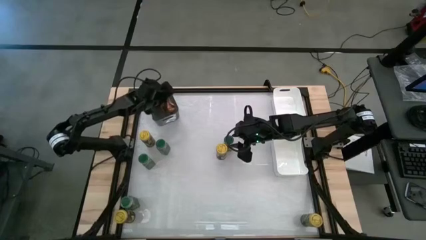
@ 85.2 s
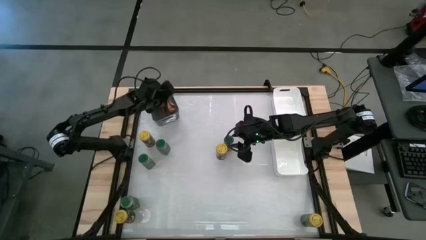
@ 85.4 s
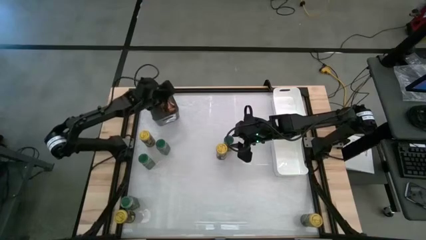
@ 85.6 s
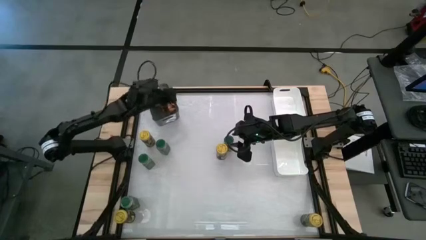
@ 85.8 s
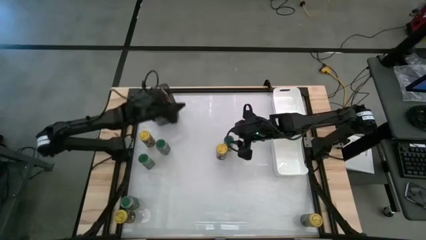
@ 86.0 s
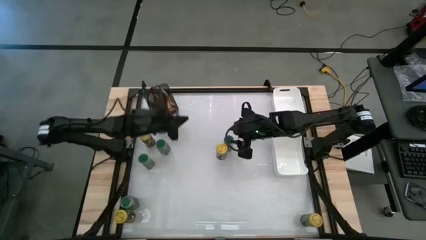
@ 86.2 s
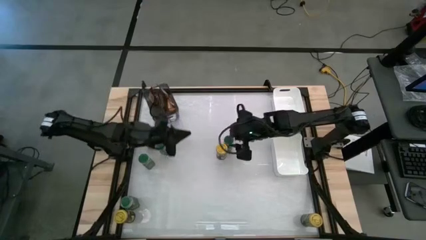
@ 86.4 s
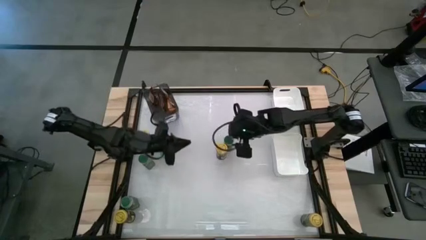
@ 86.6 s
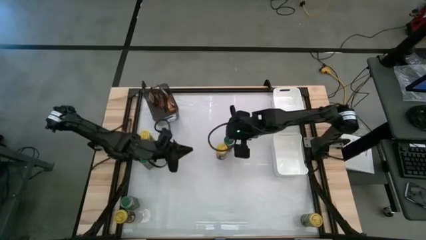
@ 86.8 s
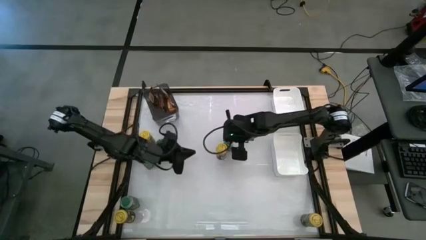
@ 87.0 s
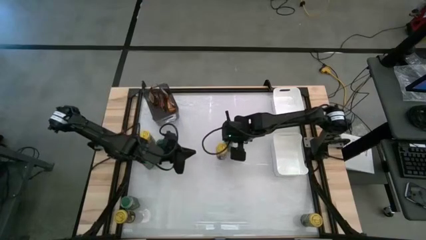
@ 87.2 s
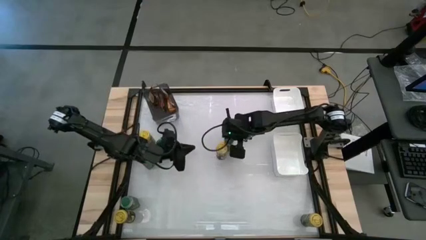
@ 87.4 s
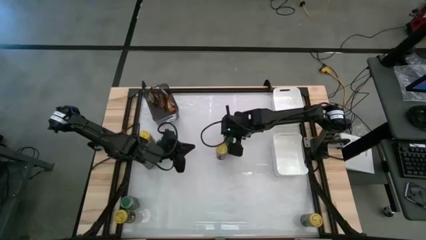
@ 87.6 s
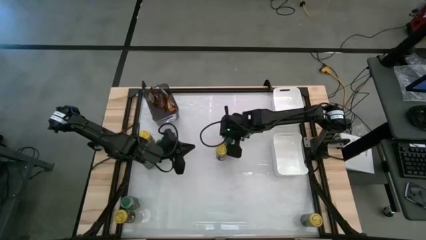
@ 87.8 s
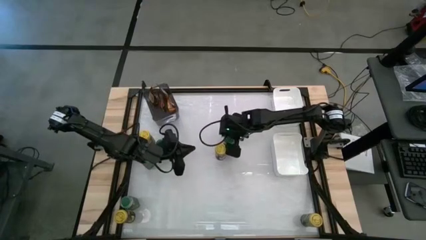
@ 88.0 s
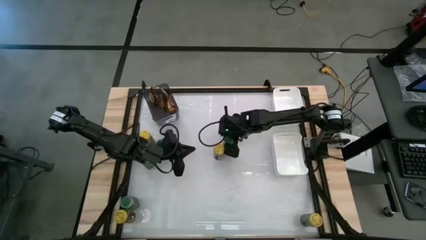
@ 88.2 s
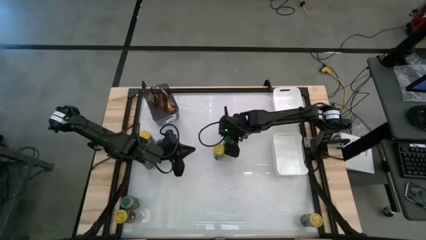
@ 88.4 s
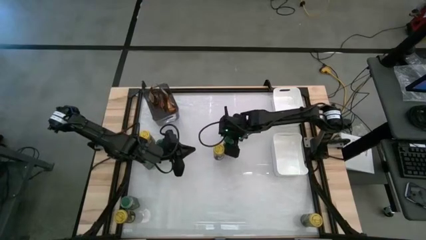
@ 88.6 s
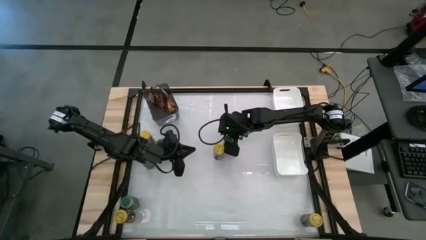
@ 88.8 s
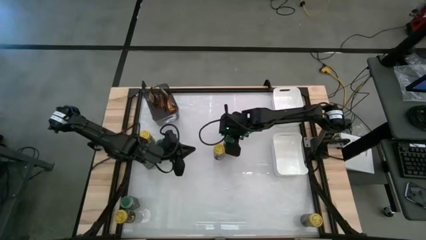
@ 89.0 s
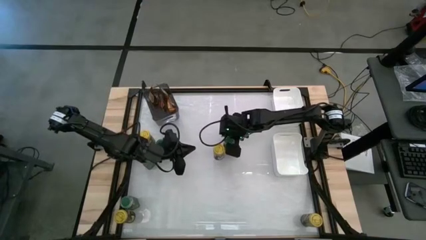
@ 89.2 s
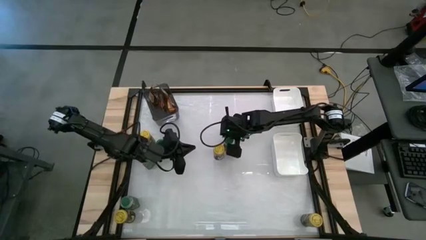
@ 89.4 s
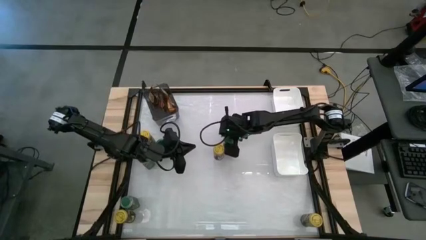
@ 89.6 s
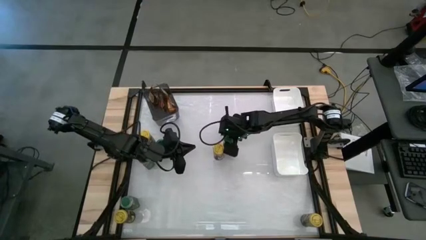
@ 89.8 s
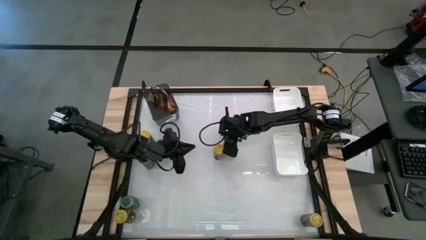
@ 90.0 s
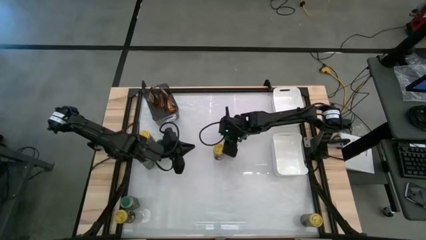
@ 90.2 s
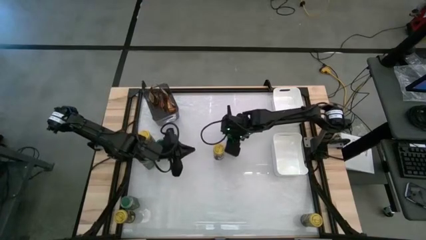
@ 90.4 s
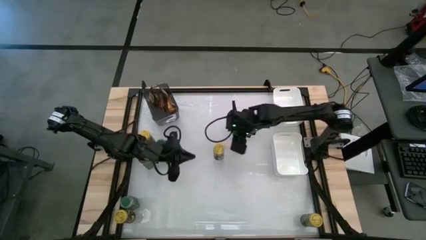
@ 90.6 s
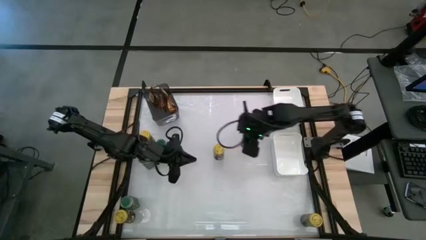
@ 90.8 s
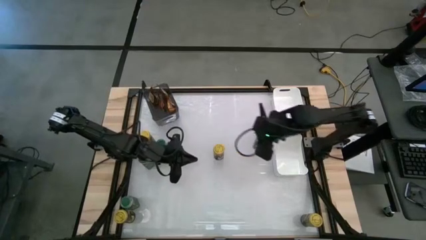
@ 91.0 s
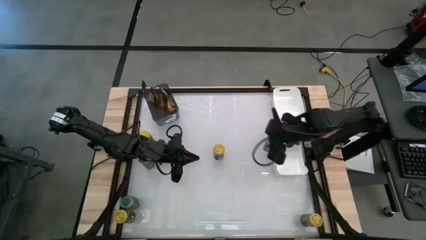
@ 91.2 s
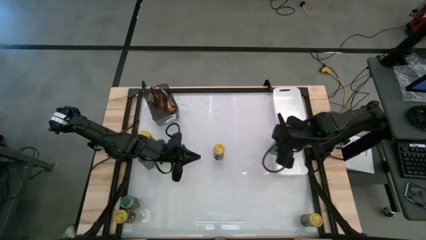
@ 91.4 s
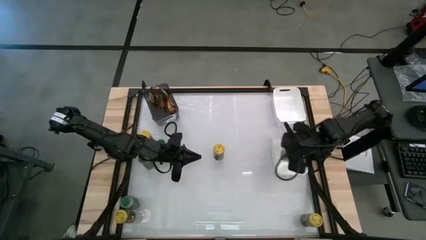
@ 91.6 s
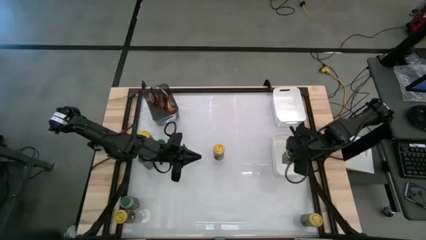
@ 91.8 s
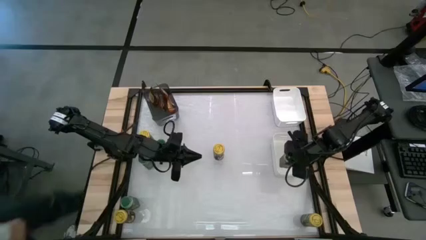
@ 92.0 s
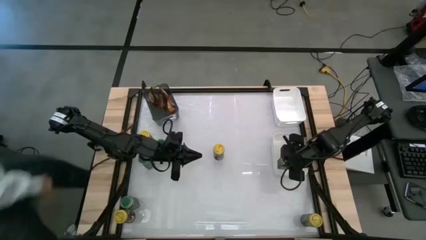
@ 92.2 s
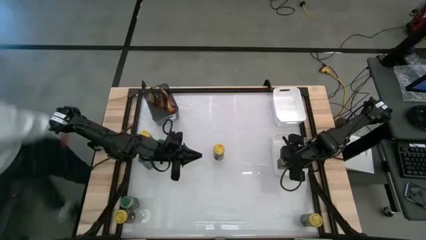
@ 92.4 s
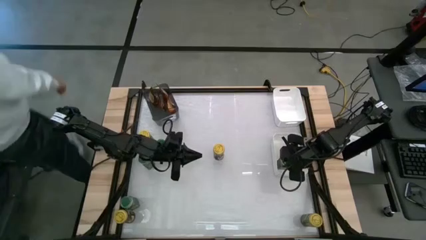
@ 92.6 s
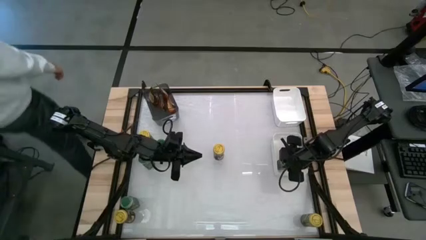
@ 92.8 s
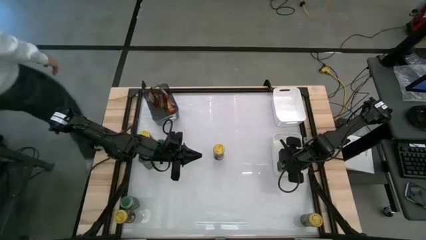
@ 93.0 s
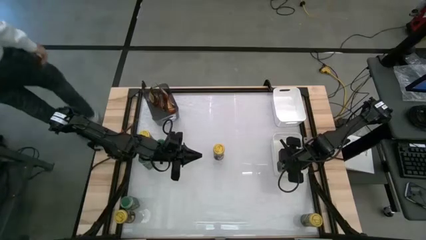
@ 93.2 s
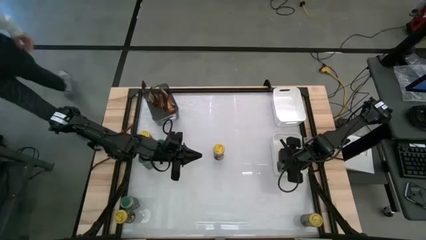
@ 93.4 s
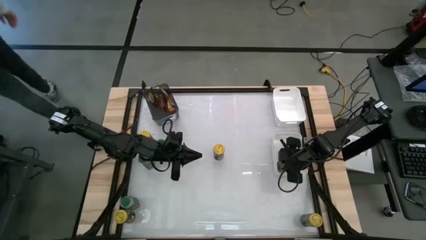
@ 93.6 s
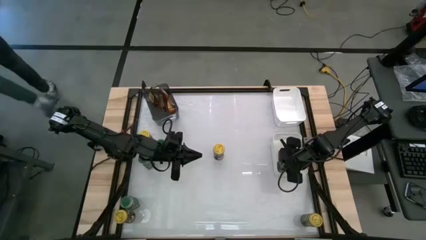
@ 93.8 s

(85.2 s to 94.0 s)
Task: Sort spices by type
Put the green seasoning bottle into the bottom white bin

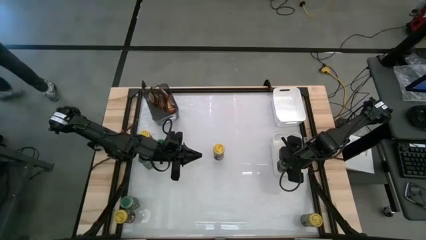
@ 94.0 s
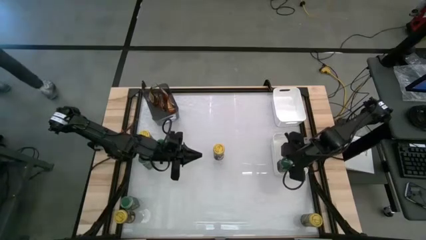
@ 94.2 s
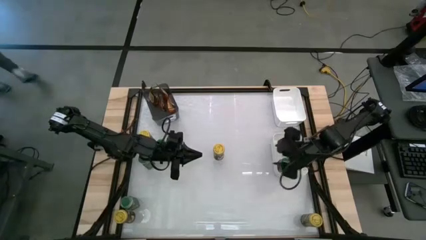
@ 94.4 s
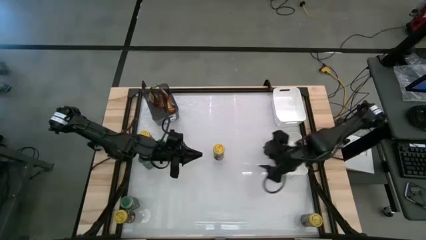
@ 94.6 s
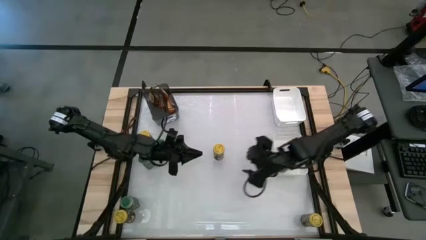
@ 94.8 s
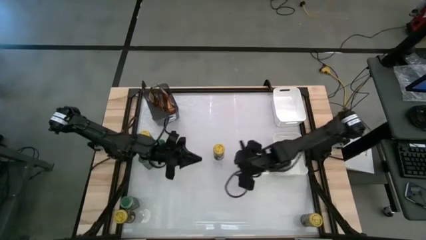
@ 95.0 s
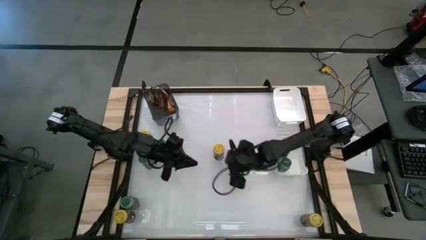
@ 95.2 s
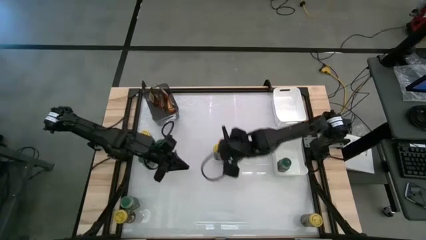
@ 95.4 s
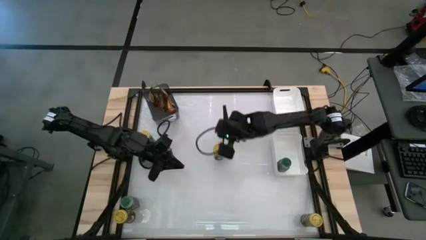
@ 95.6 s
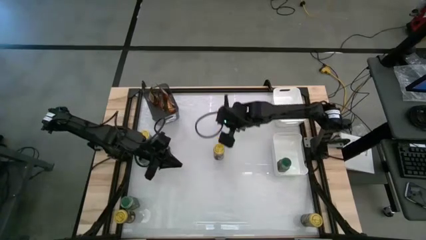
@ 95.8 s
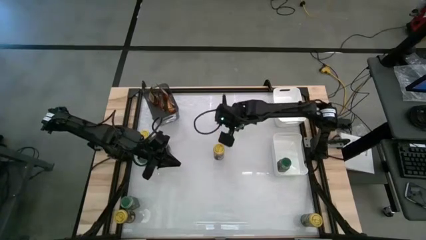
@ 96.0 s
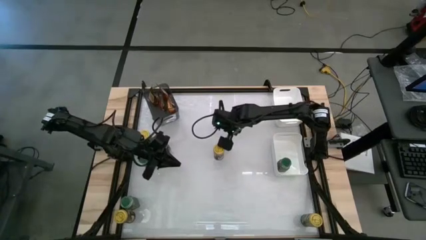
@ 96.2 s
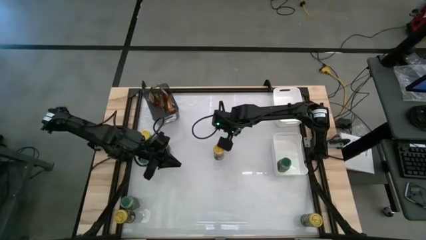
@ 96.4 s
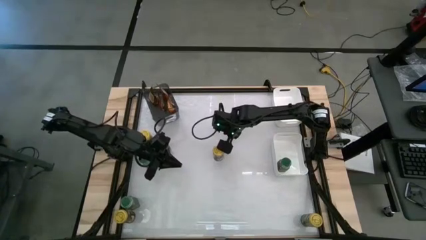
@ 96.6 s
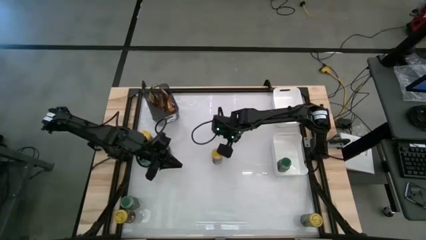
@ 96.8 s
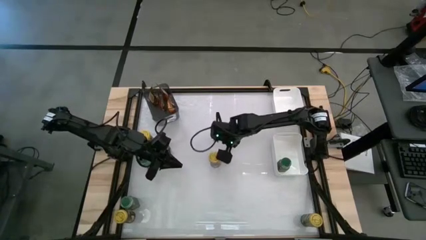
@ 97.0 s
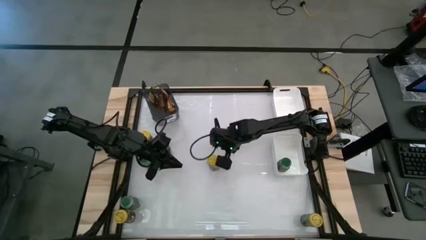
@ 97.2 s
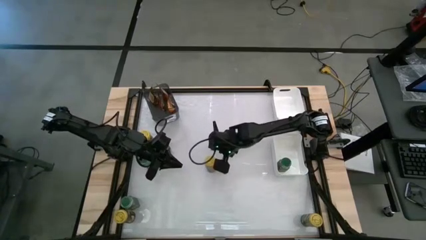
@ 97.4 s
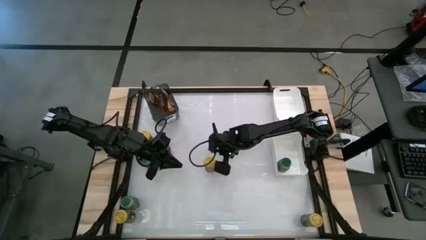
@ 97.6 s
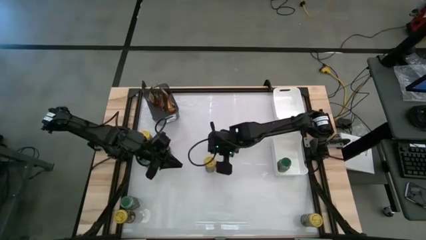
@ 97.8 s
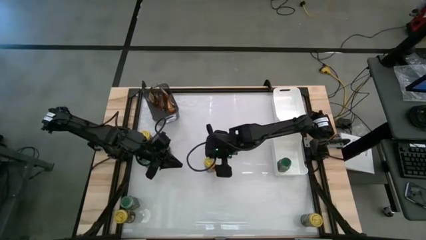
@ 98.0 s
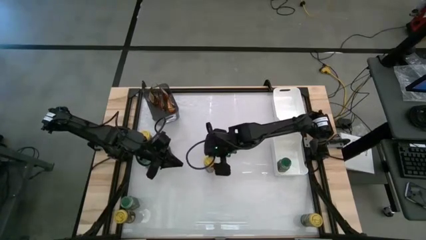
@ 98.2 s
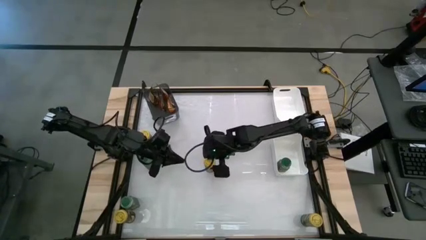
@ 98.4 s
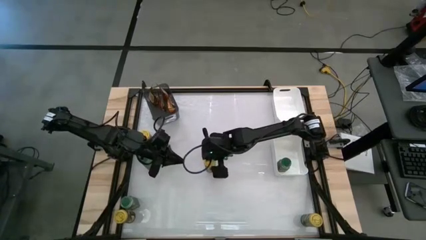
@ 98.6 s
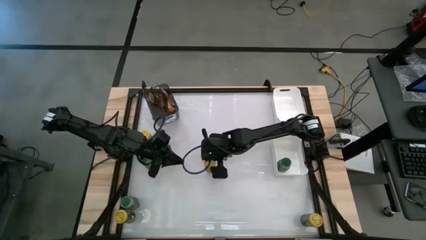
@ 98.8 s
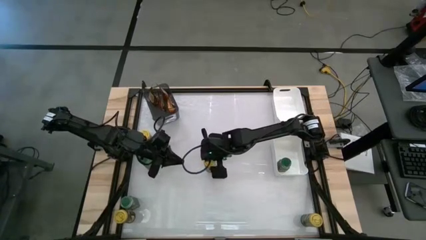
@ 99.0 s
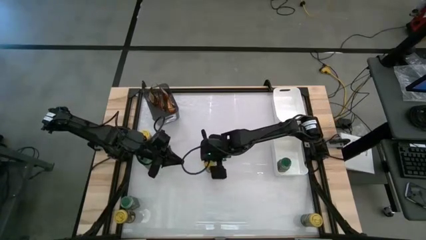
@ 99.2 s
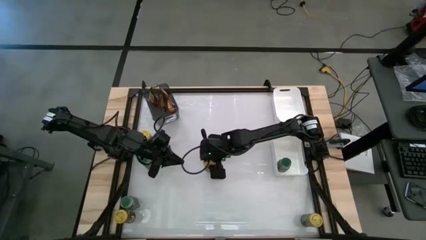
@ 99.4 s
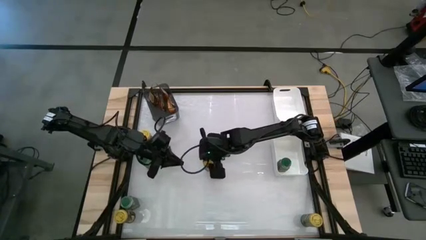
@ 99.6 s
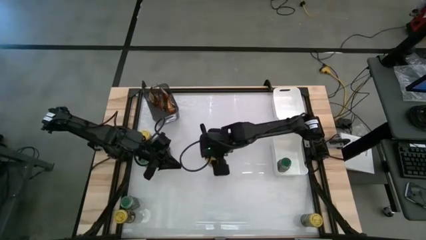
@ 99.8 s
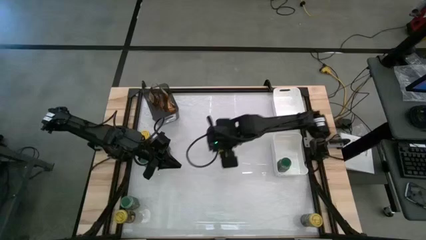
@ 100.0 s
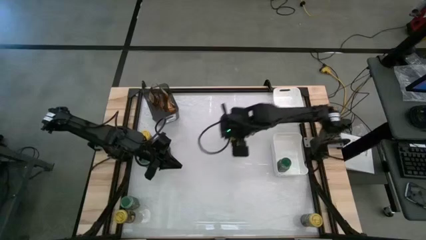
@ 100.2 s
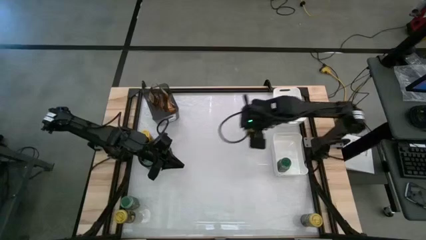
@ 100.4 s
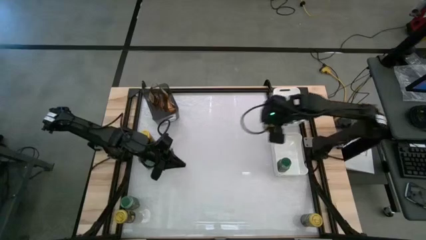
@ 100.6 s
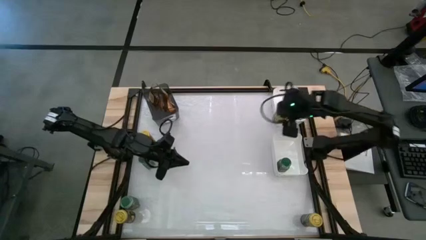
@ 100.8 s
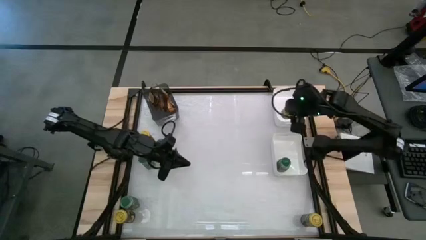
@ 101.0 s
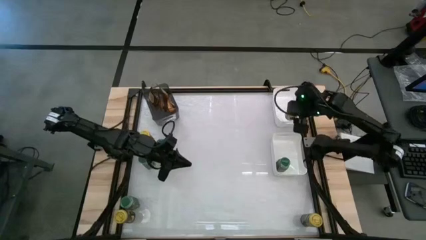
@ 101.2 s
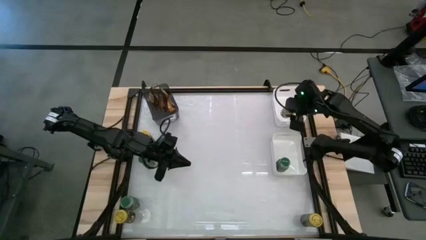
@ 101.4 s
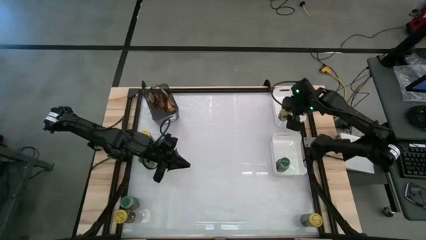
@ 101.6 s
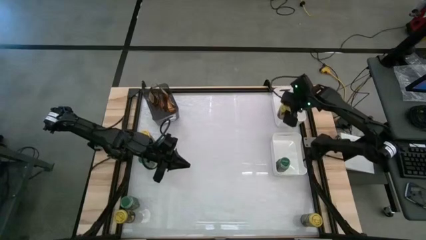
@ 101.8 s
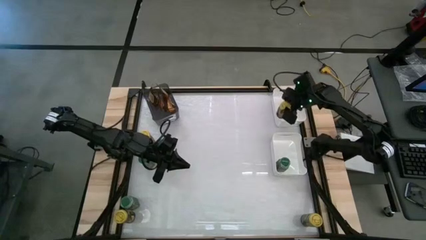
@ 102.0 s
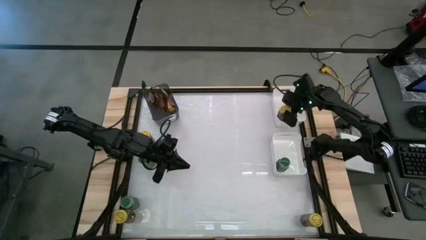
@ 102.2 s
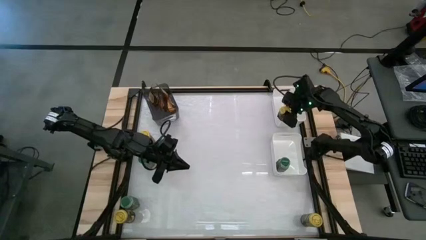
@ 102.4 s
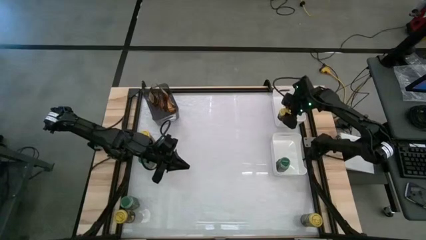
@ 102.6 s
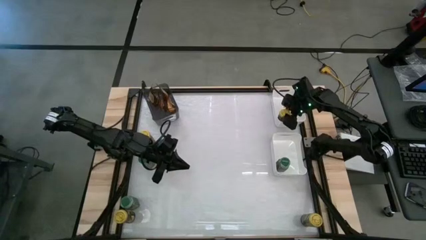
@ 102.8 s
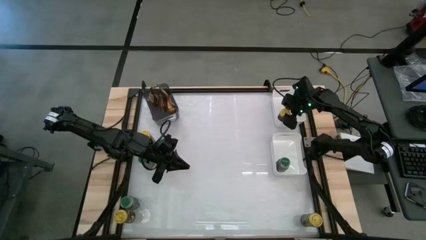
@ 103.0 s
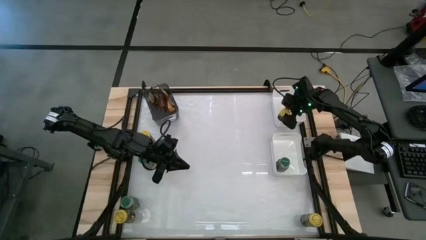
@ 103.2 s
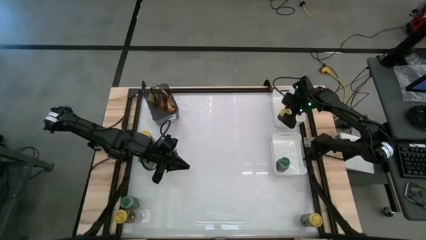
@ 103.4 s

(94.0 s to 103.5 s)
Put the yellow seasoning bottle into the top white bin
